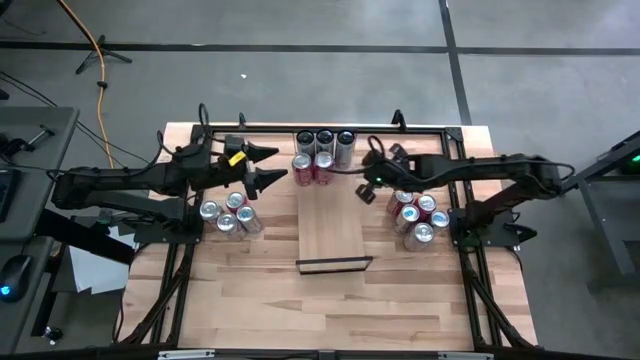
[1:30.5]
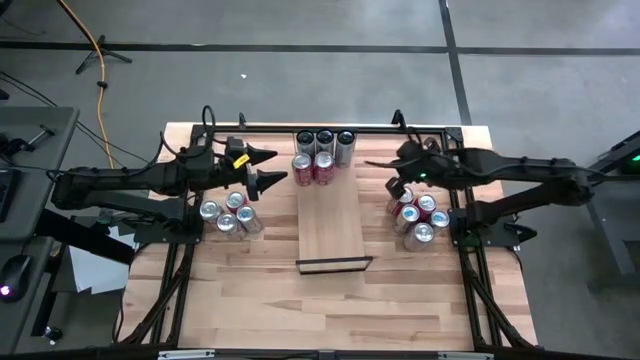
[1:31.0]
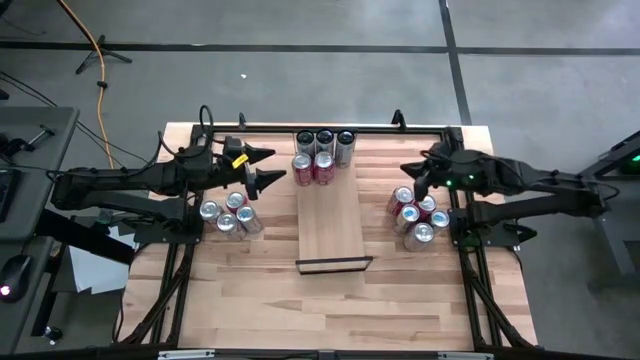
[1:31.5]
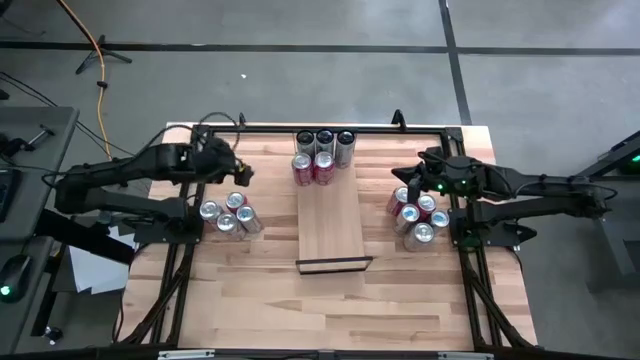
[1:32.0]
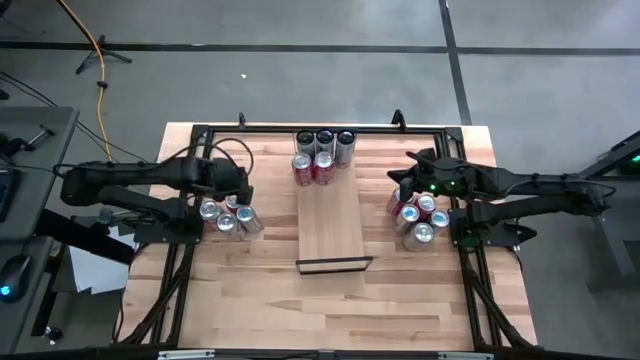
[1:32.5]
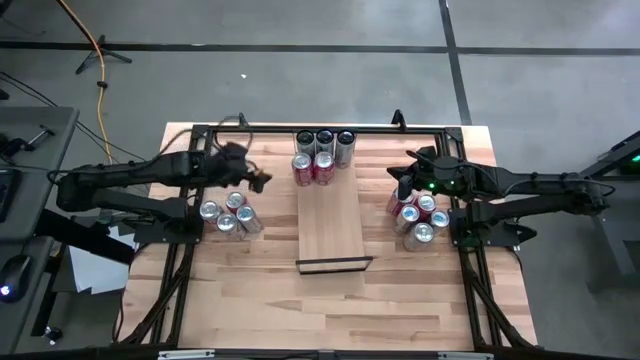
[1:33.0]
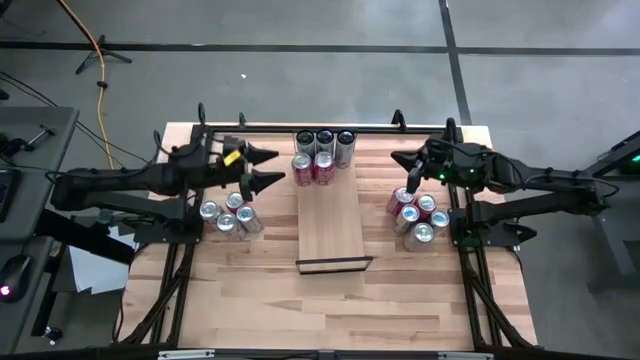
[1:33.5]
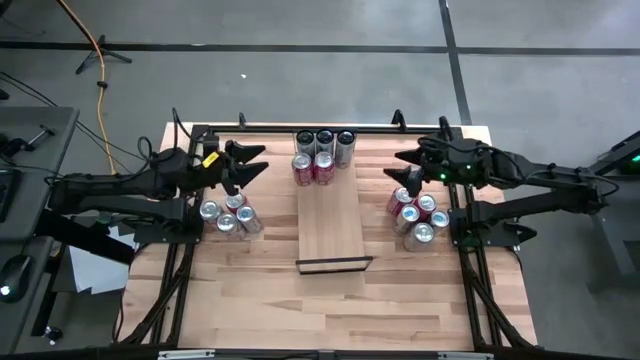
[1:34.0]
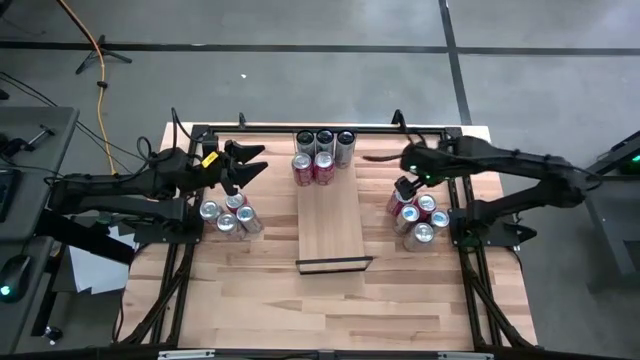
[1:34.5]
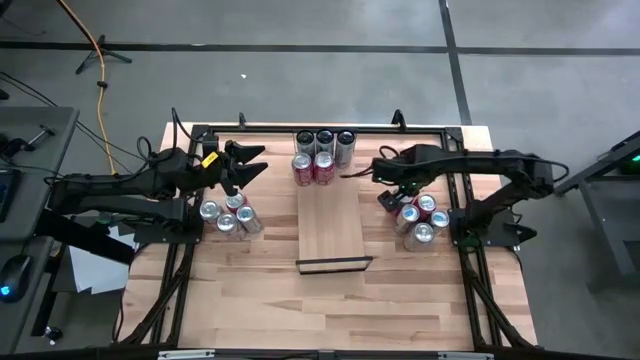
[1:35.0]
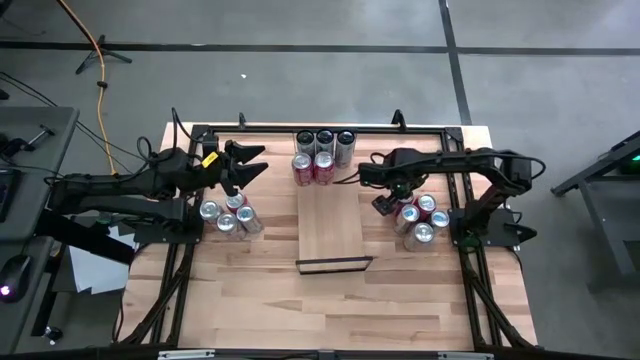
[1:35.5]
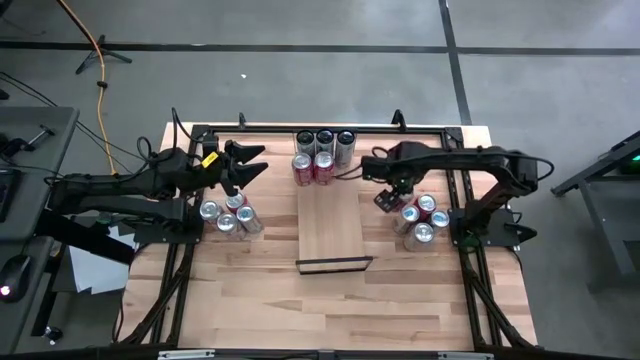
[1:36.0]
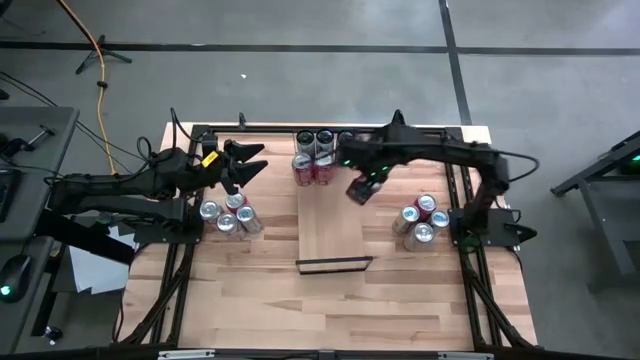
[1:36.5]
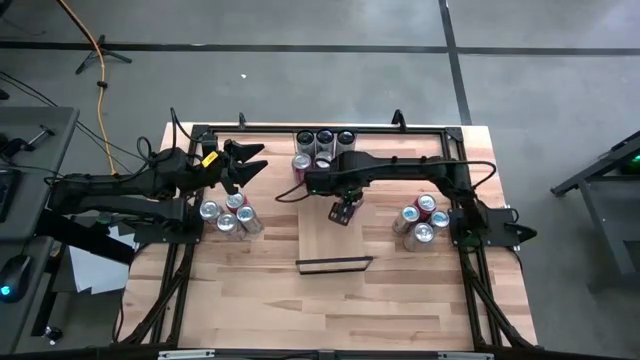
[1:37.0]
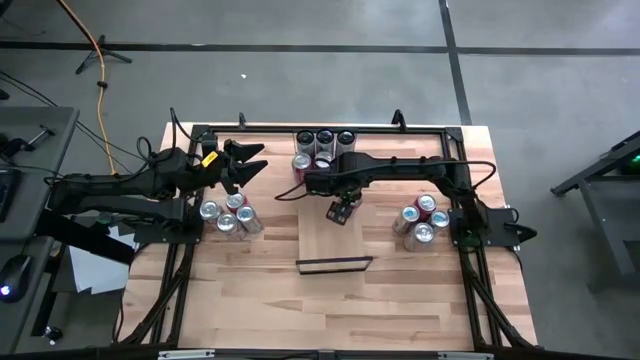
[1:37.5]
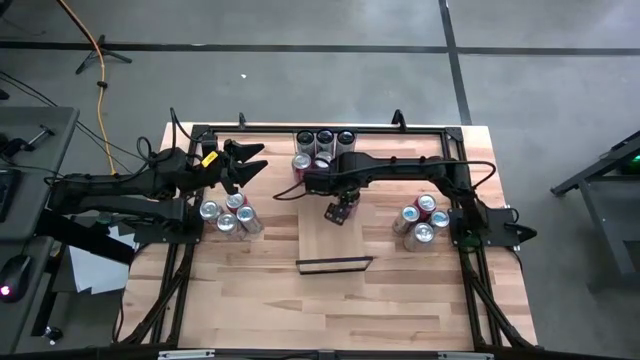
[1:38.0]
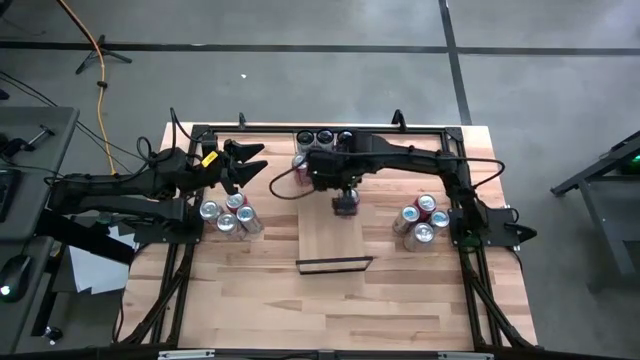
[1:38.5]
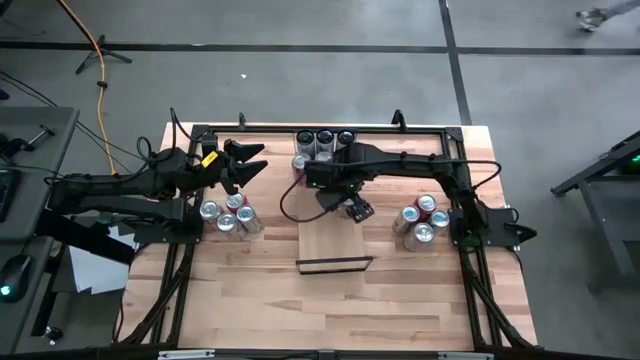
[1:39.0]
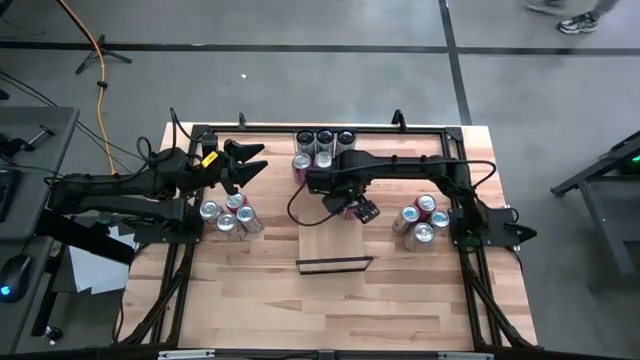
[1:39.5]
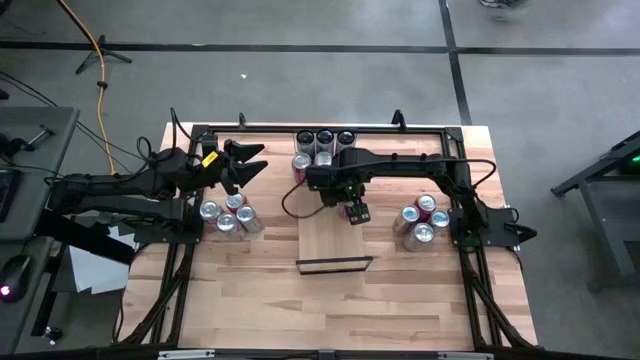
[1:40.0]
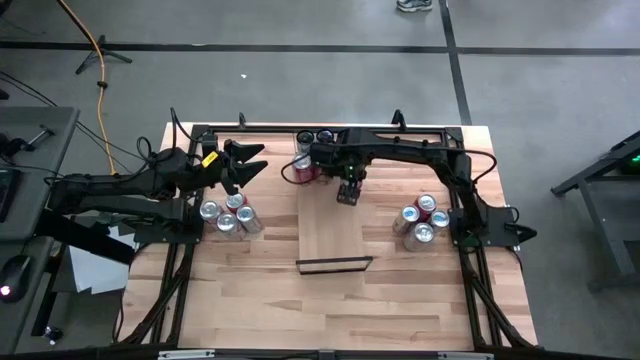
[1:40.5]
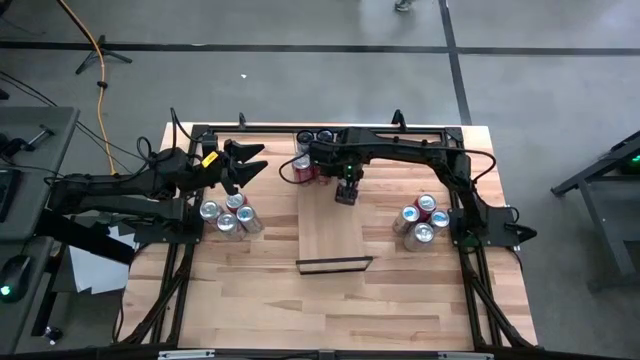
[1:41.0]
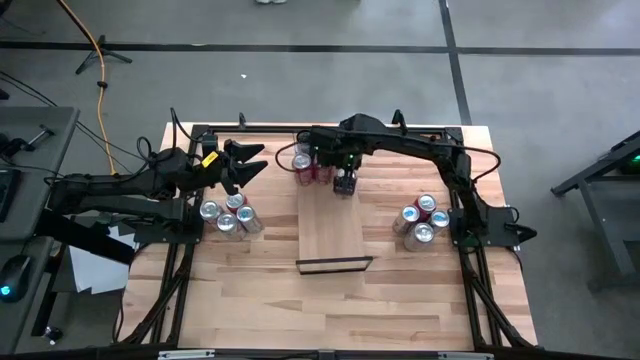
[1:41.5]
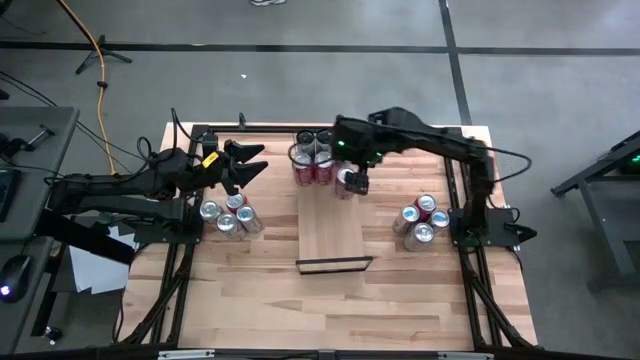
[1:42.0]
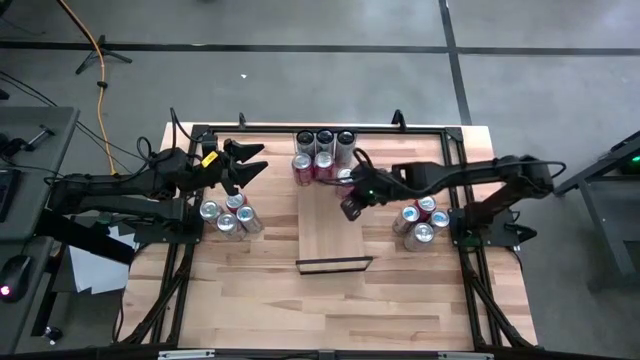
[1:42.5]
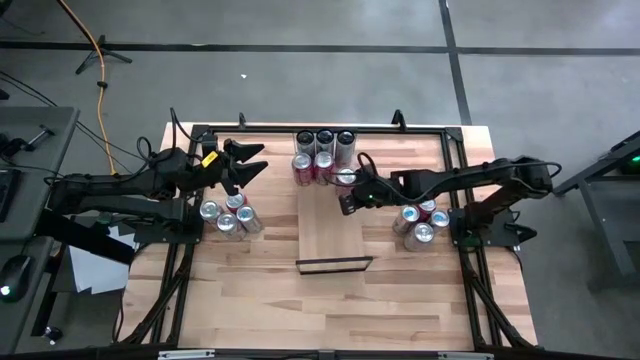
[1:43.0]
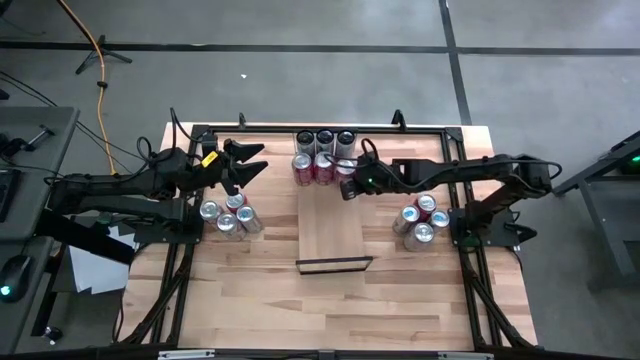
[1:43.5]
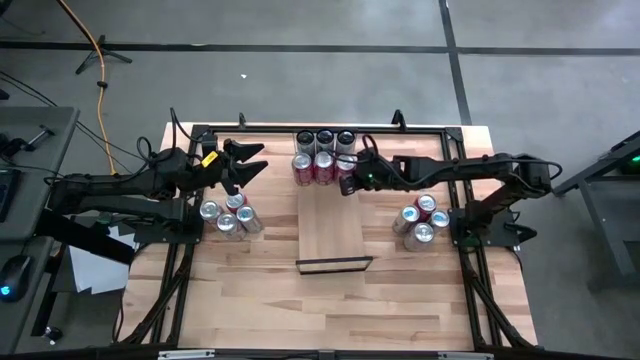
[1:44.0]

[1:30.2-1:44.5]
Task: Place canned beverage on shelf
Put the red/white soda can on the shelf aligned with the other red/white soda cans

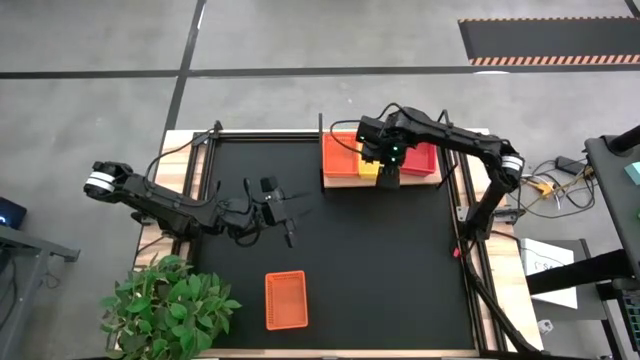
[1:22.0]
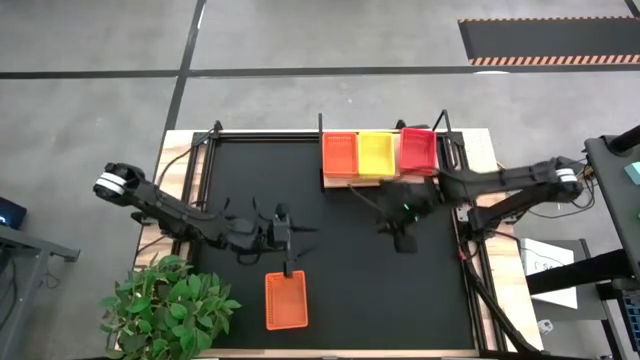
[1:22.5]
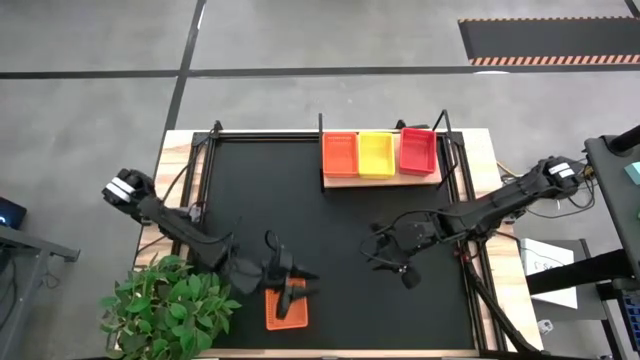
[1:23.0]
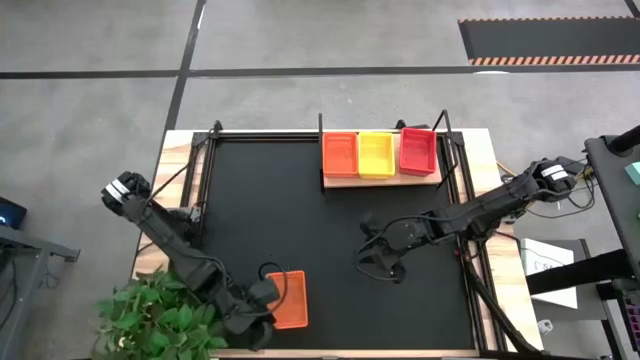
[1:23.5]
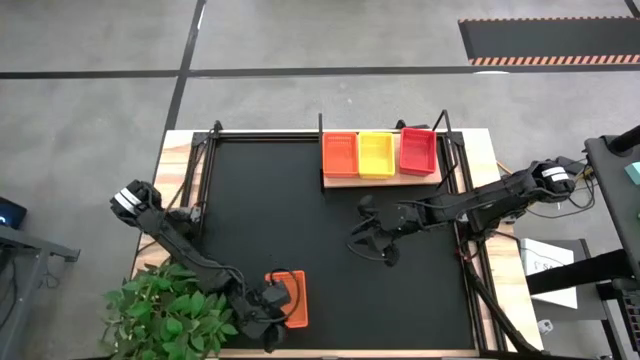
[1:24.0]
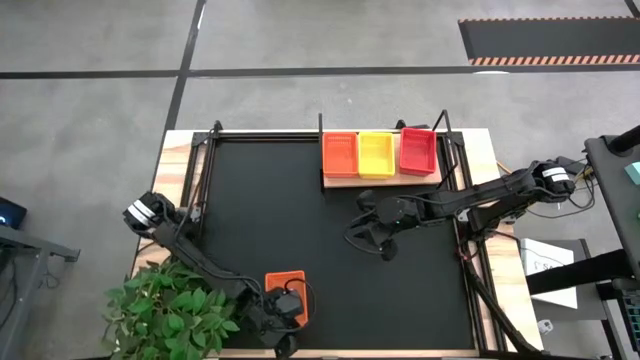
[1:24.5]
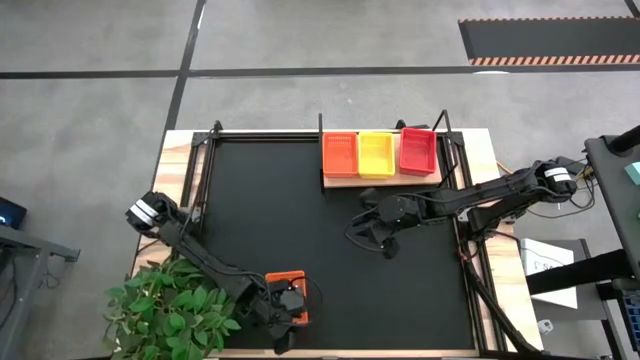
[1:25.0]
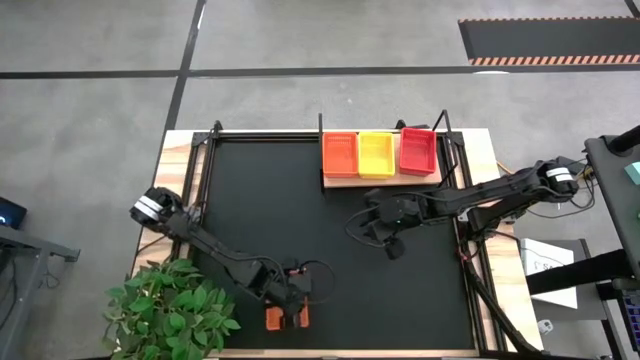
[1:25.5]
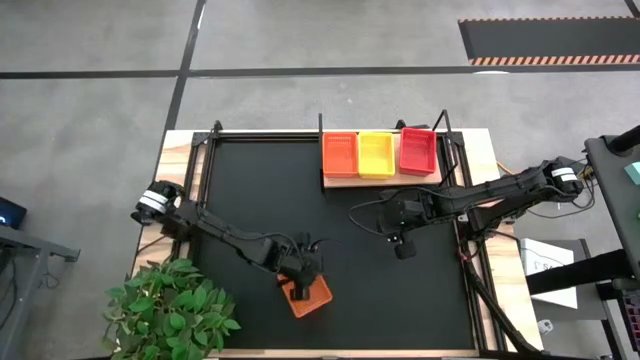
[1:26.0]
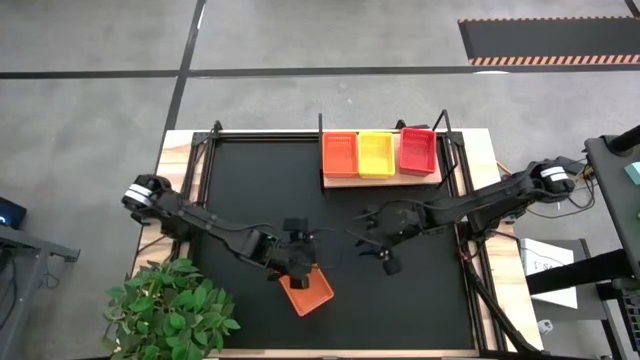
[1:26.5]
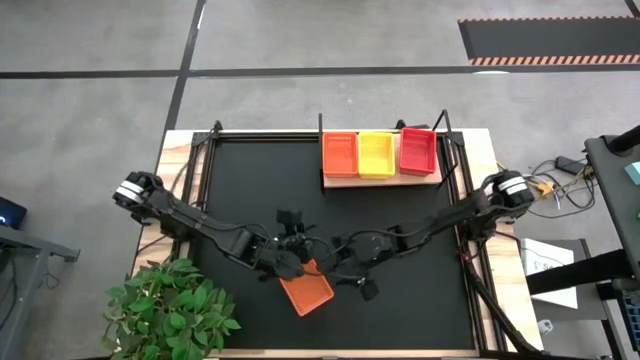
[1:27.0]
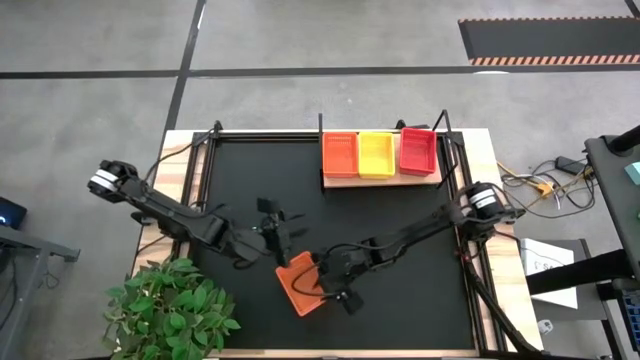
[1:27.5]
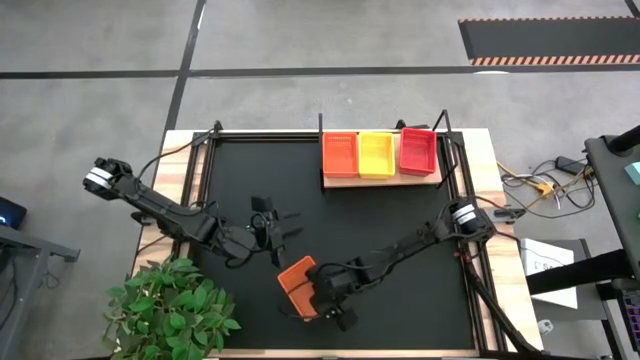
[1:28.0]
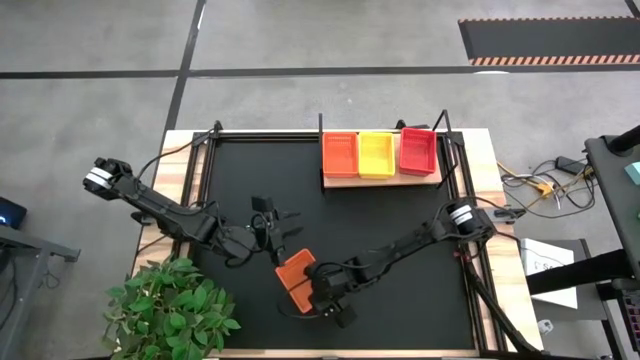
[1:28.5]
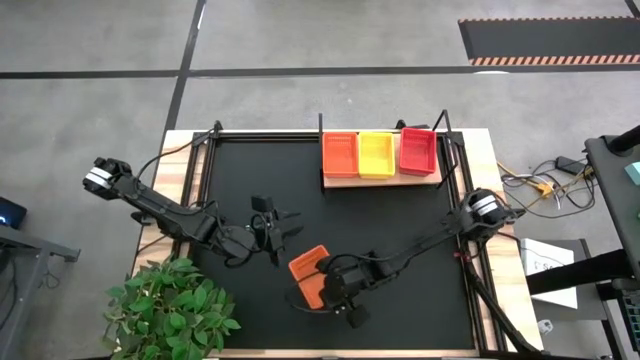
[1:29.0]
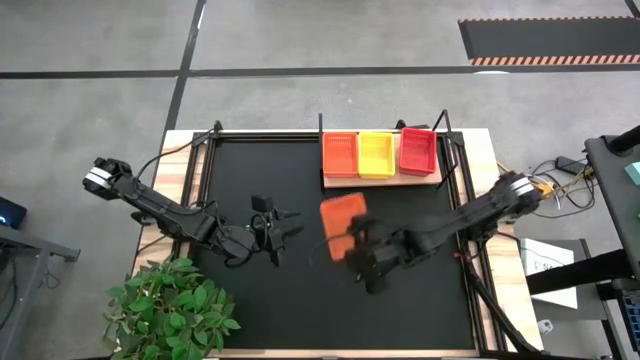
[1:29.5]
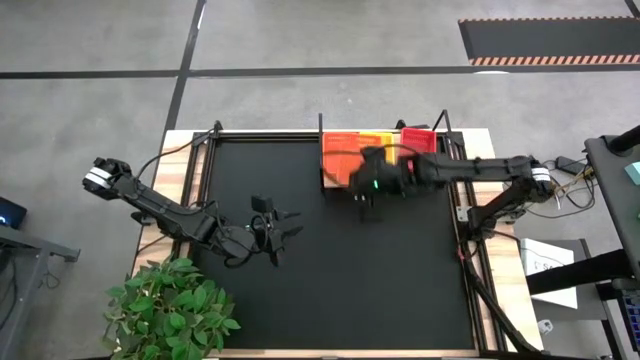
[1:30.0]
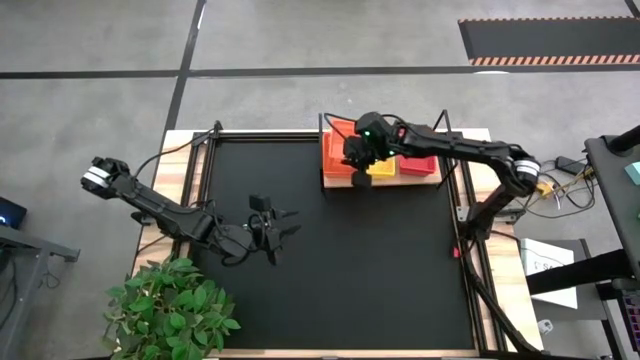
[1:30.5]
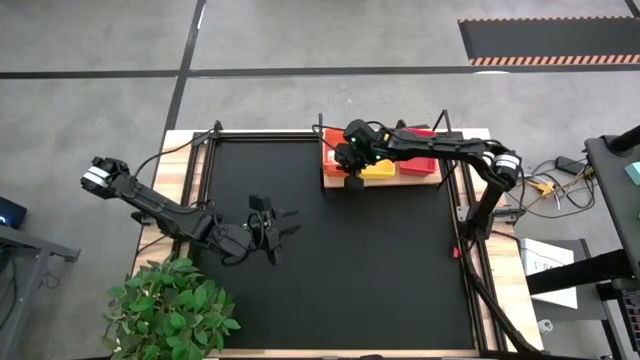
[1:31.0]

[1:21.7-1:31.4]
Task: Stack baskets on shelf by color
Stack the orange bin on the stacked orange bins on the shelf
